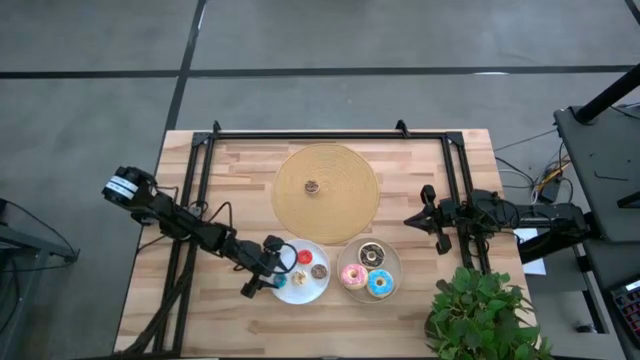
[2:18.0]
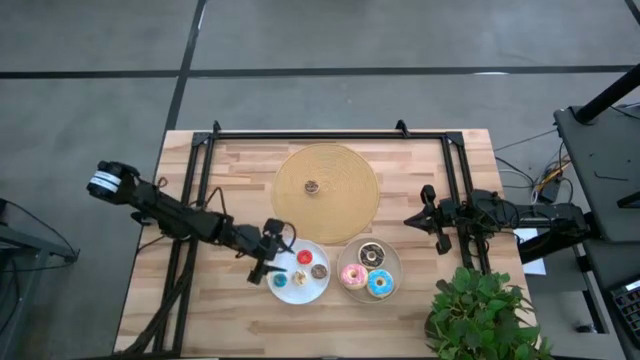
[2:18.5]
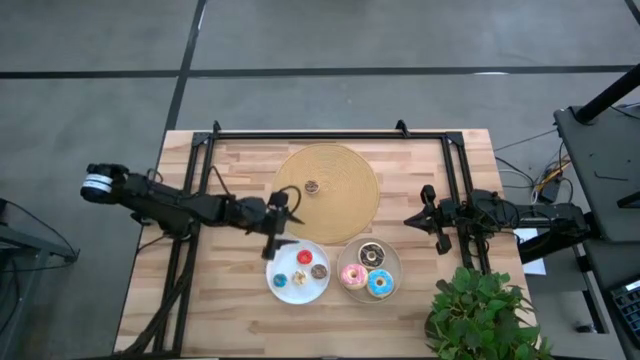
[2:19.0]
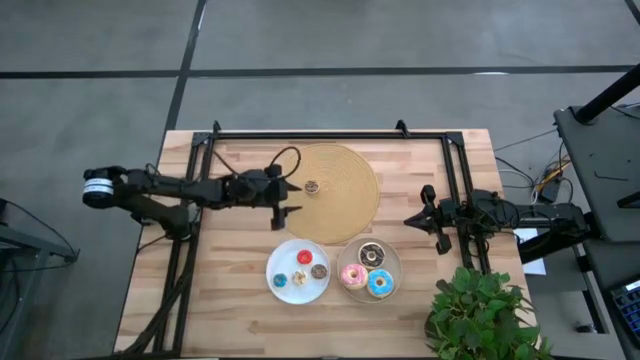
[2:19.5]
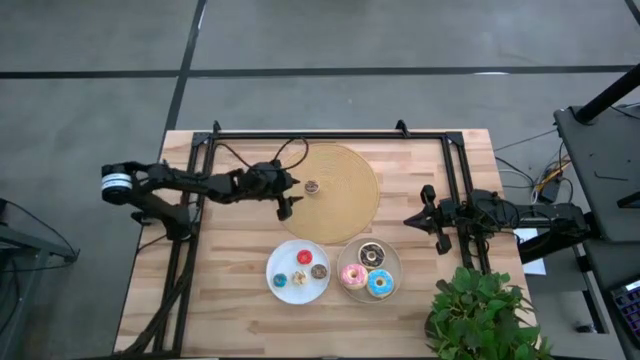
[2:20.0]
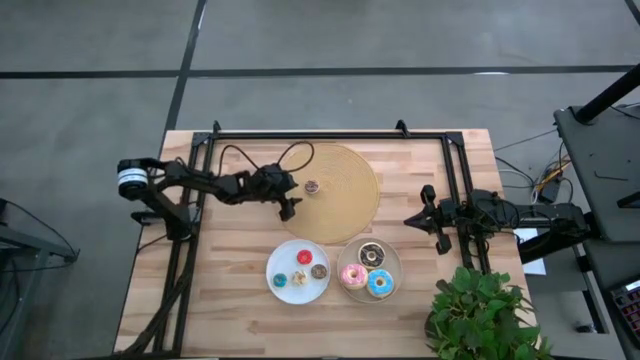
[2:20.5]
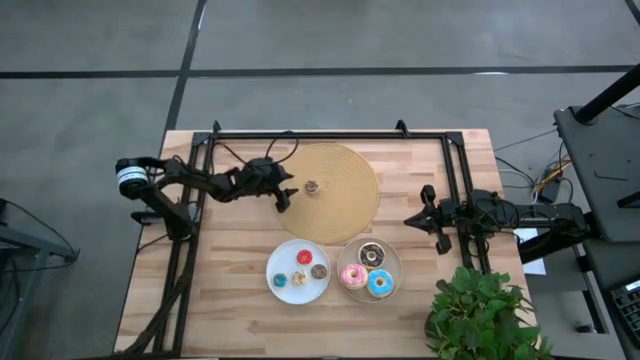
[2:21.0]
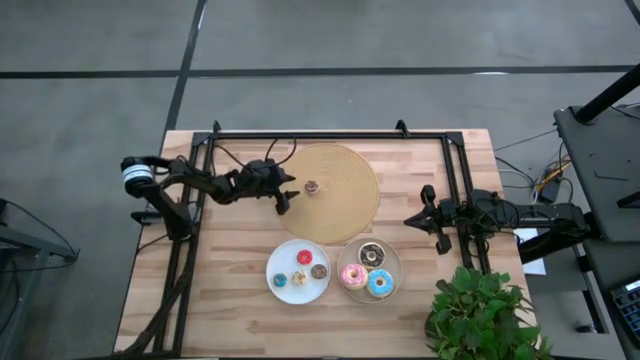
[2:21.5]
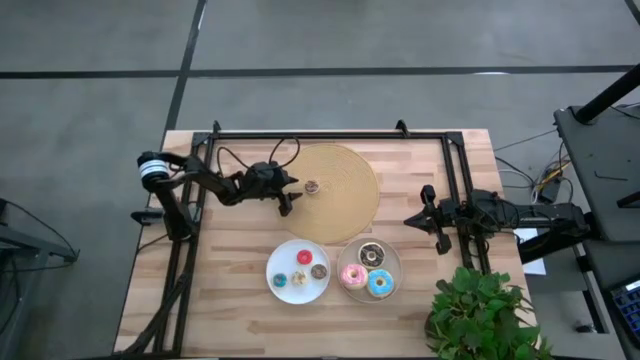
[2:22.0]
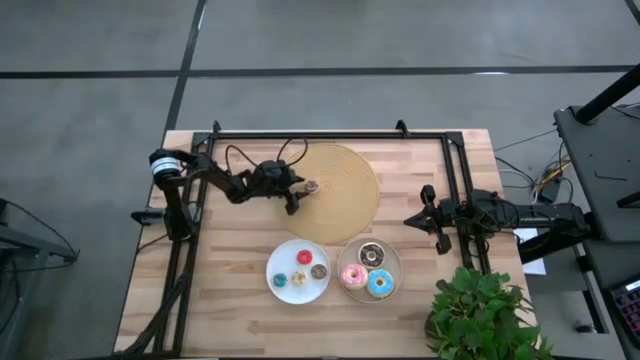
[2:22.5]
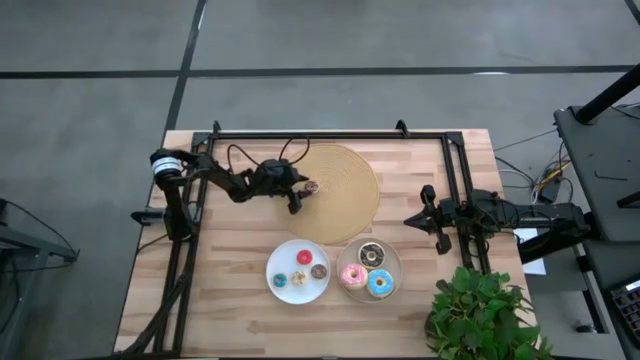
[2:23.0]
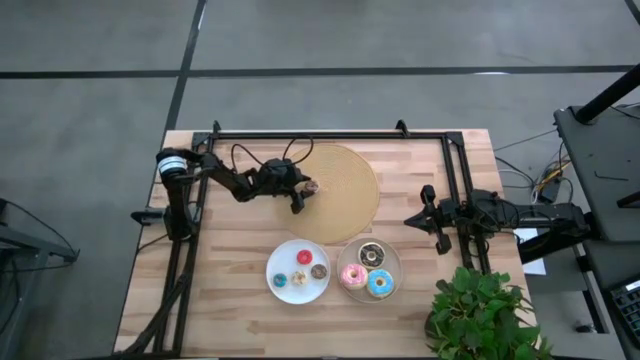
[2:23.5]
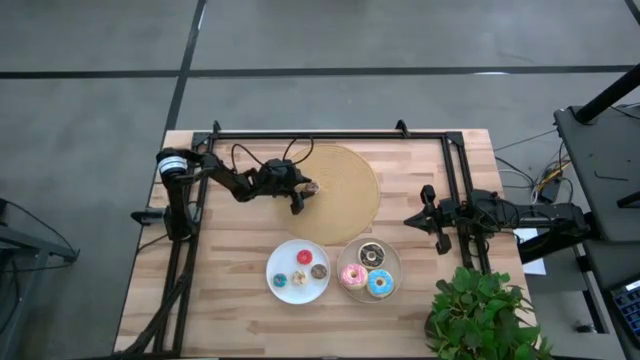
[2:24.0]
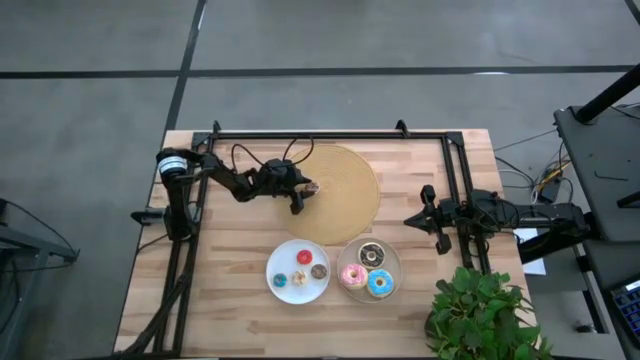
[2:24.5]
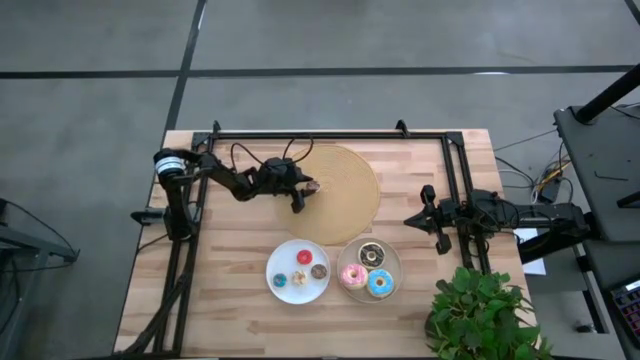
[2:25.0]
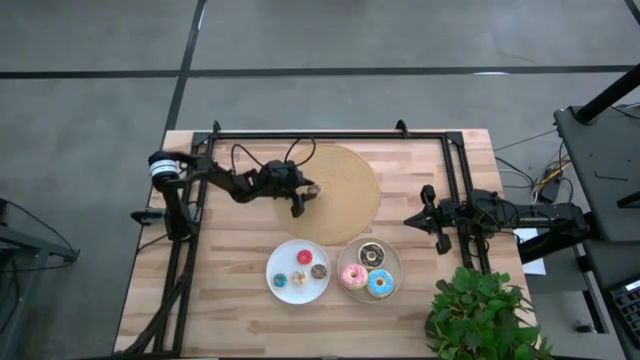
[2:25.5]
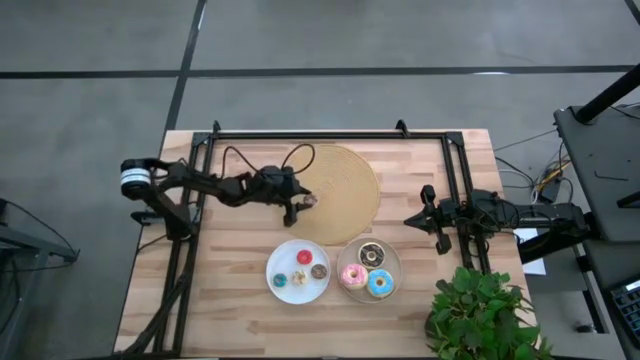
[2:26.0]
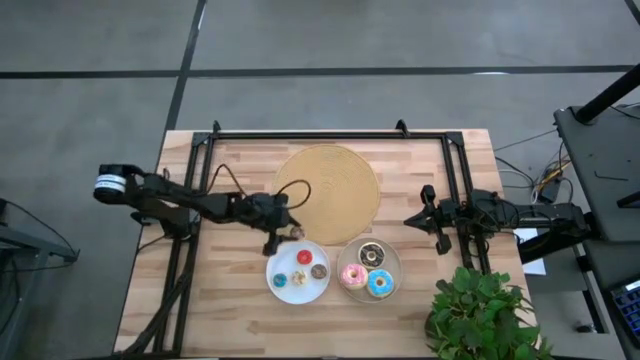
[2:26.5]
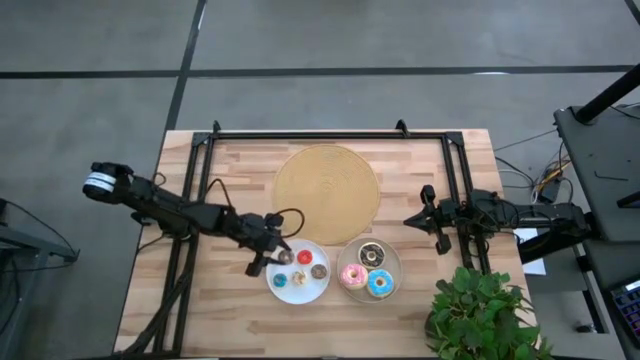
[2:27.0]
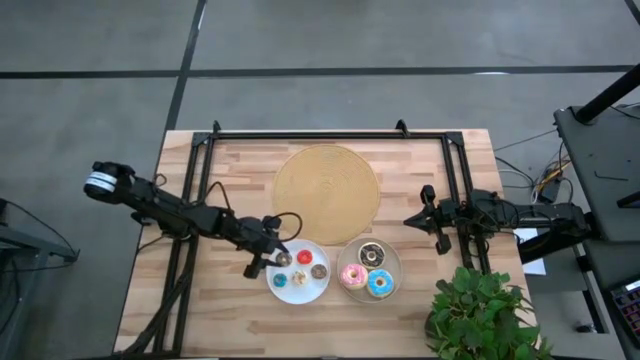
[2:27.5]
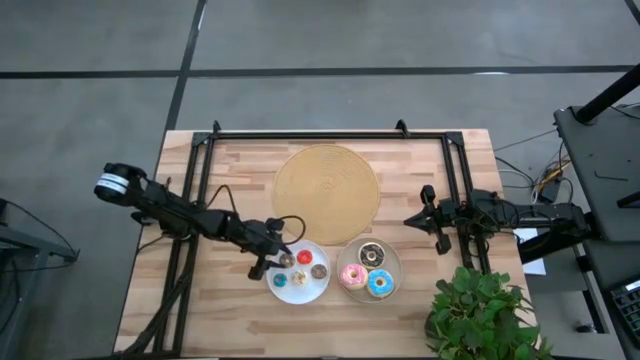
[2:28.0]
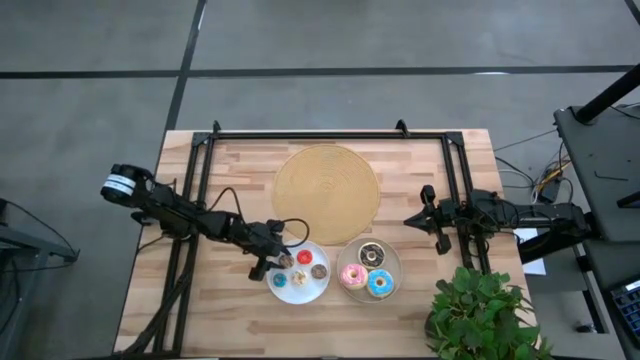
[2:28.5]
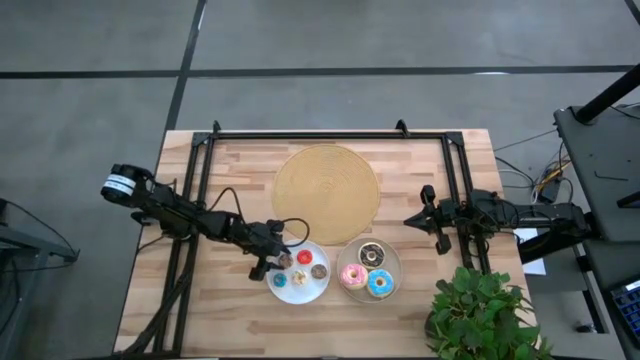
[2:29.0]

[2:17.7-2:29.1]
Task: Pick & Place donuts
Put the small brown donut on the white plate

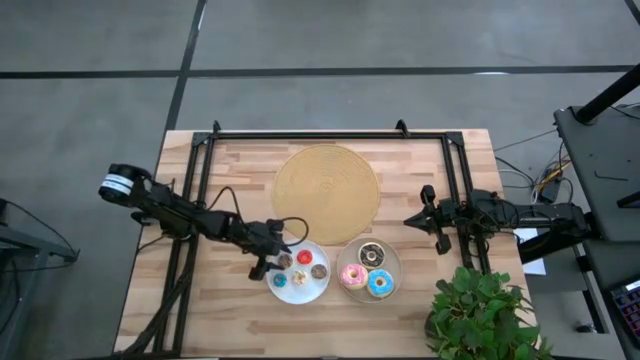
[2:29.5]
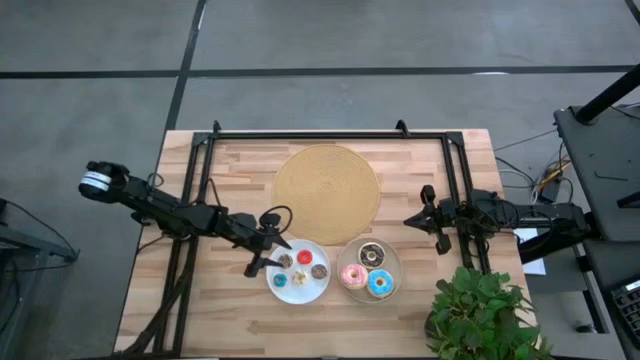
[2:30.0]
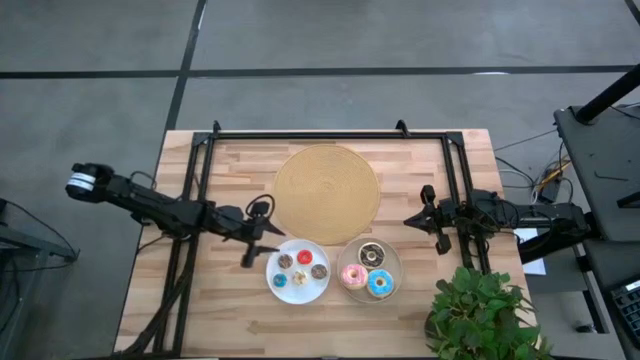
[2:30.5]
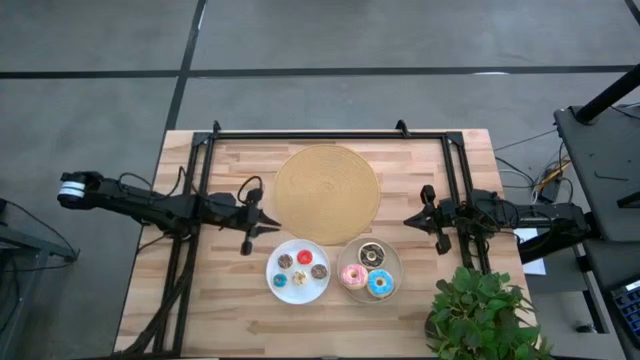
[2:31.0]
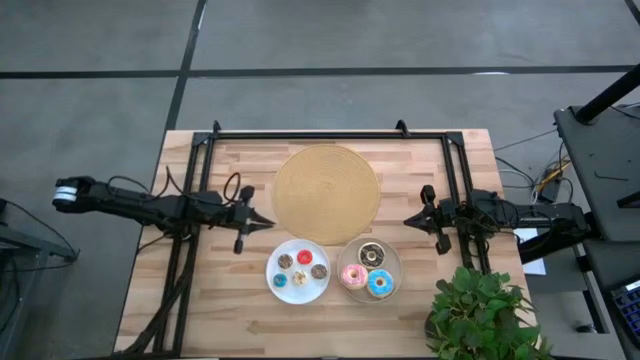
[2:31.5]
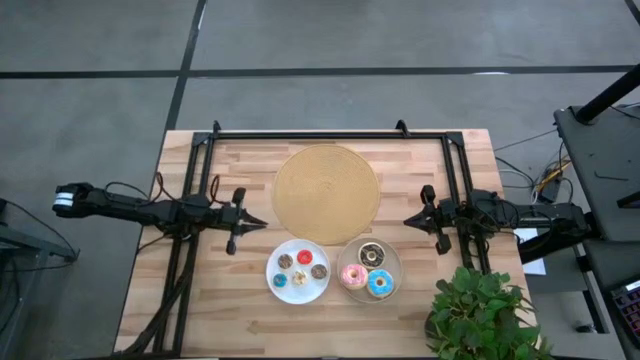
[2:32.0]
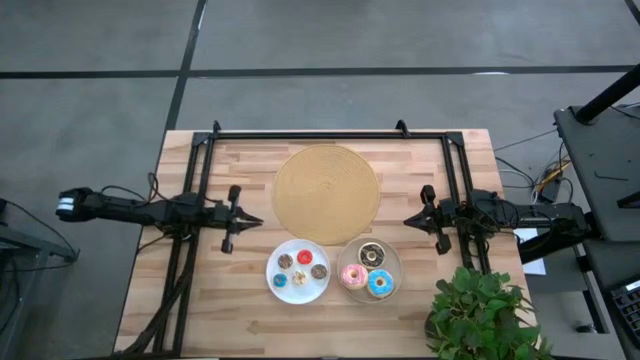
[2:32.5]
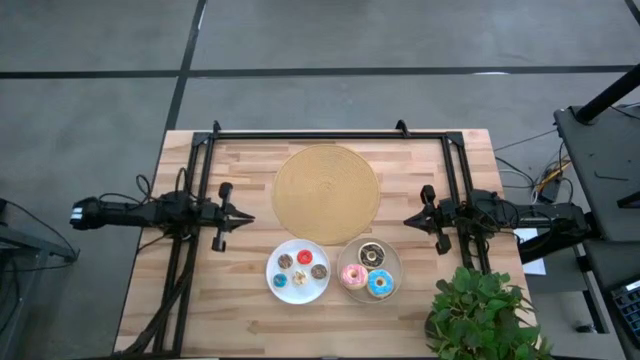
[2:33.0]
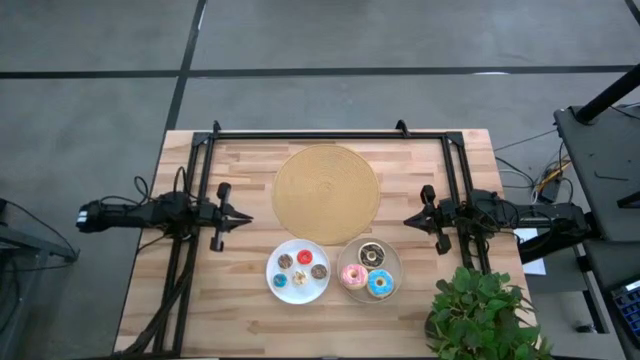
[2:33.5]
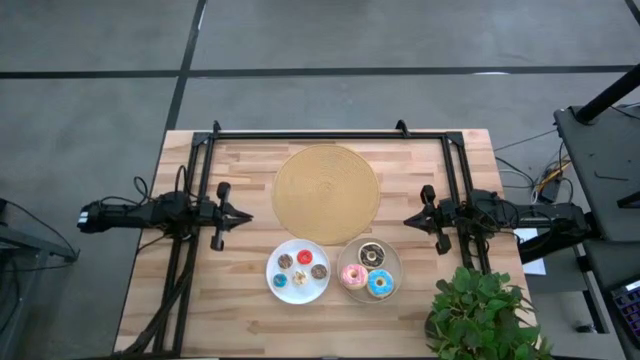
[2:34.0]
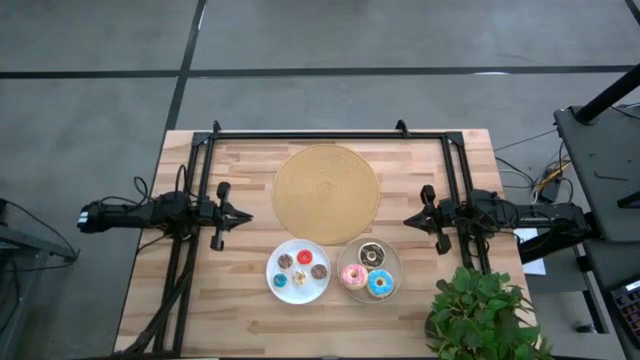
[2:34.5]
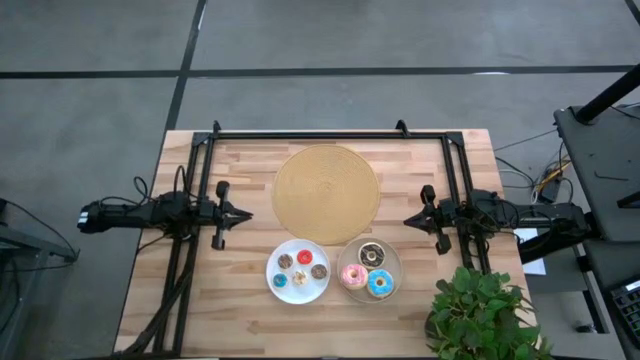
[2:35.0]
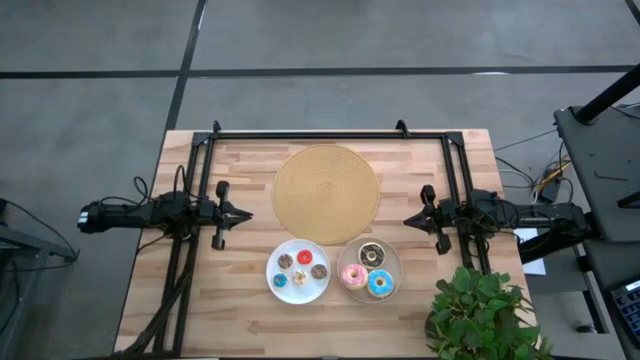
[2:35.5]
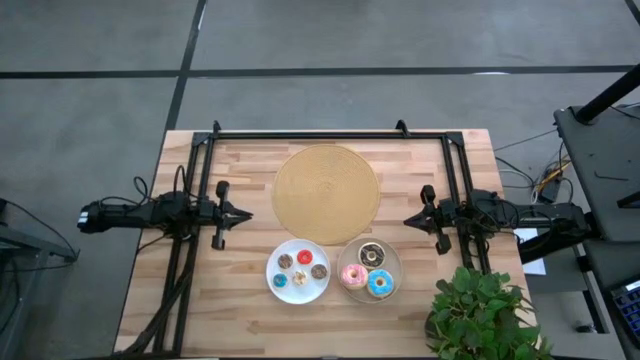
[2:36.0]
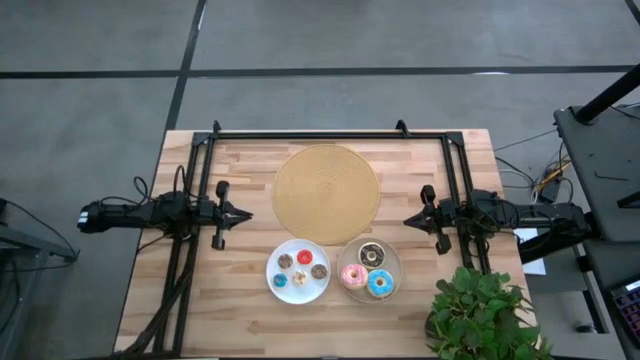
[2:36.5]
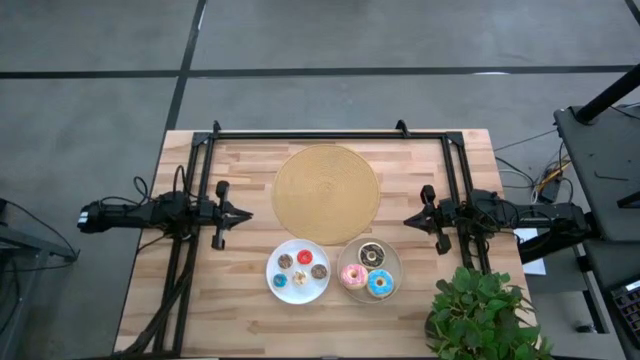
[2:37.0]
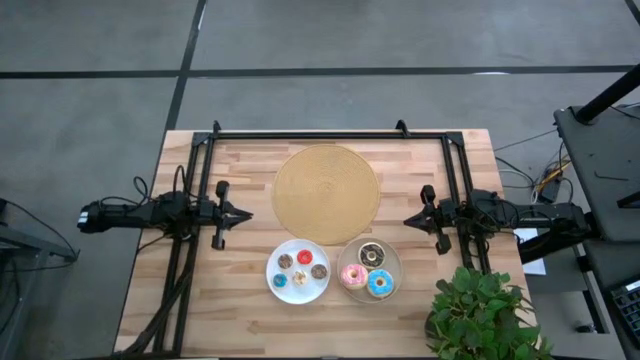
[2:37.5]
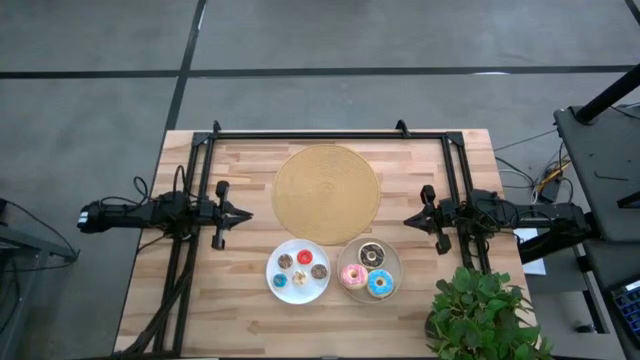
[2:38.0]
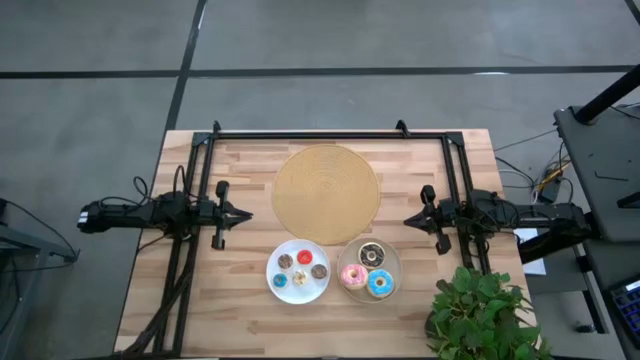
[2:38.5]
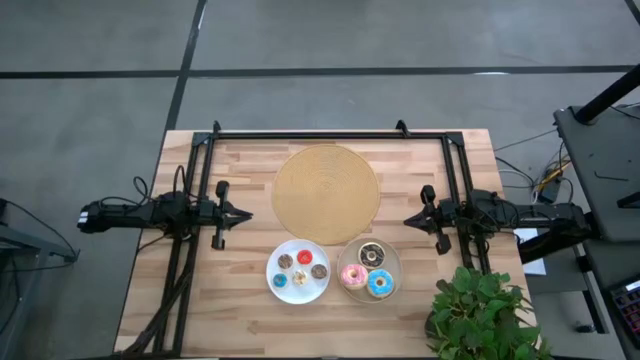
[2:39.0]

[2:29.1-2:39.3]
Return to Home Position
